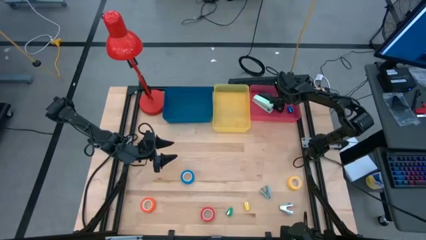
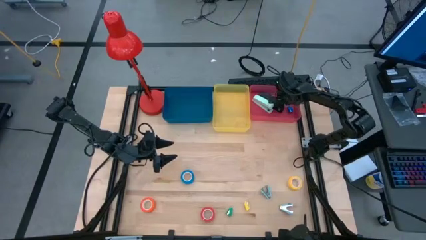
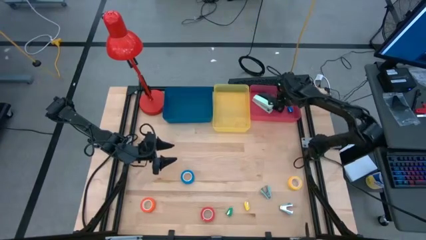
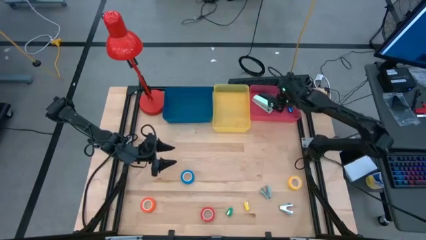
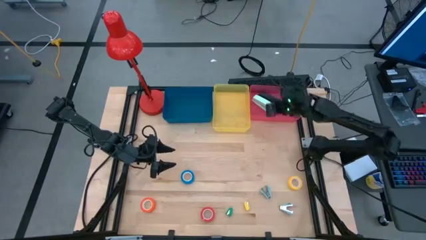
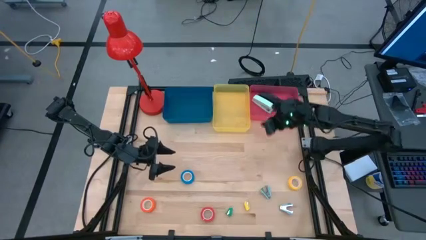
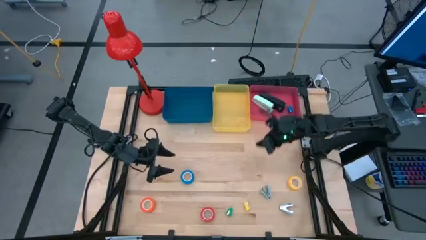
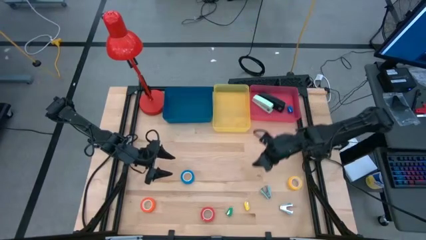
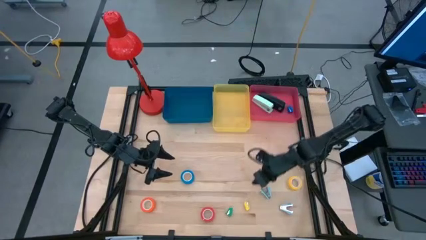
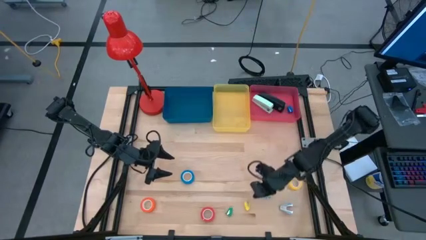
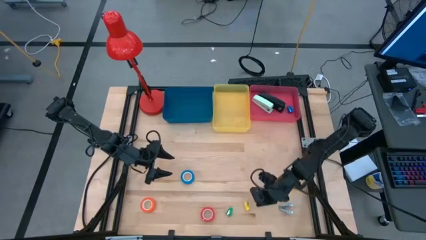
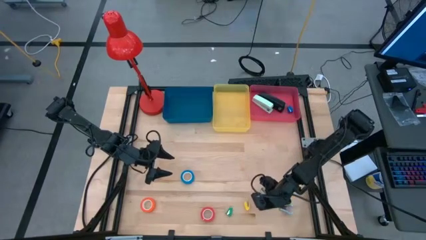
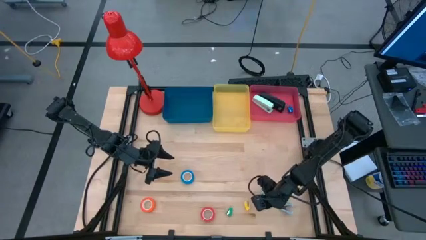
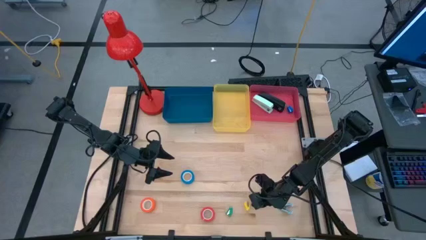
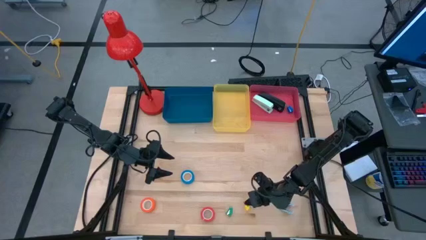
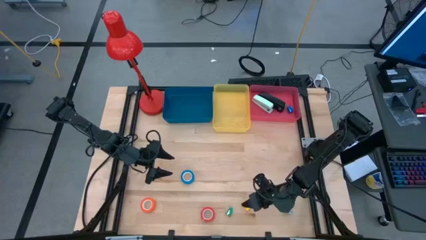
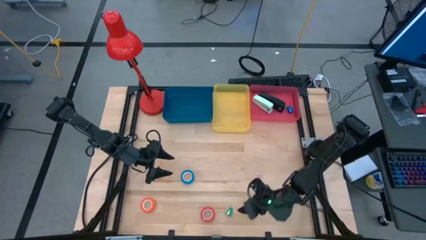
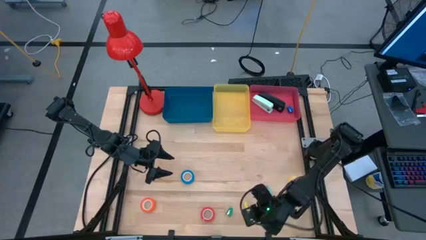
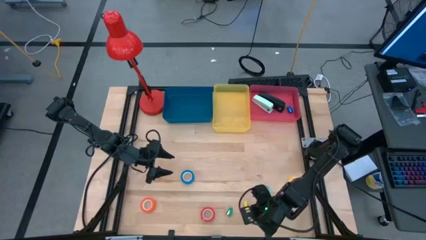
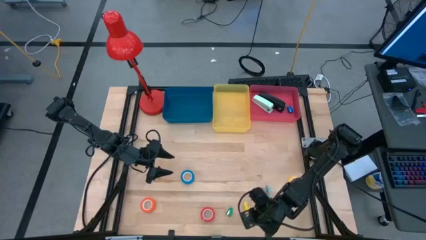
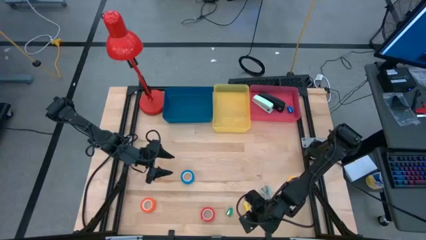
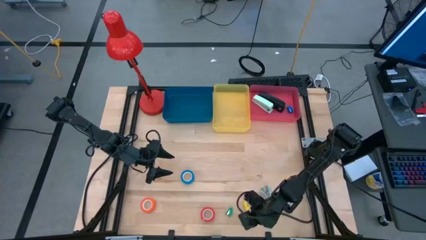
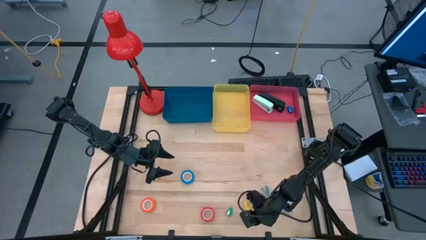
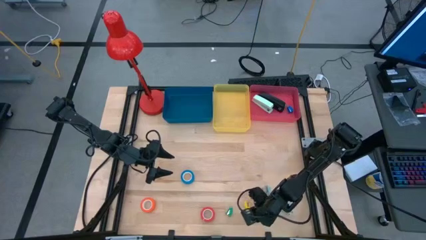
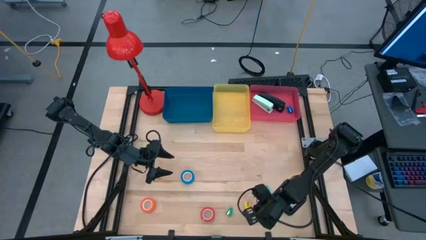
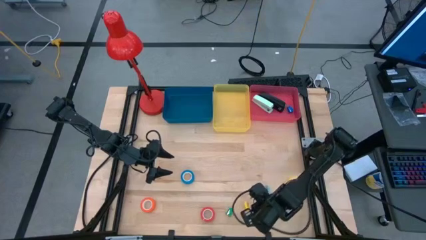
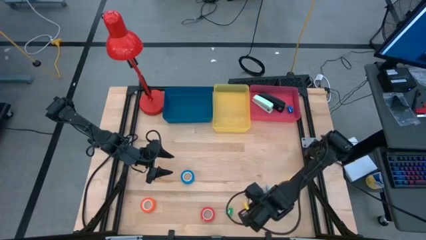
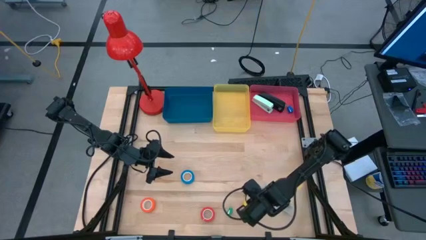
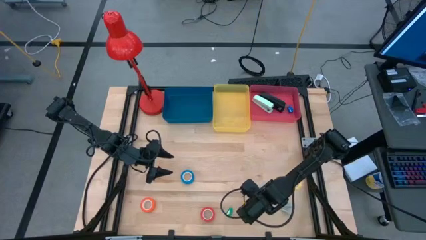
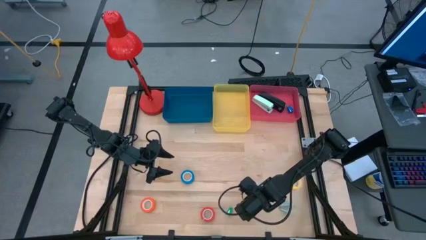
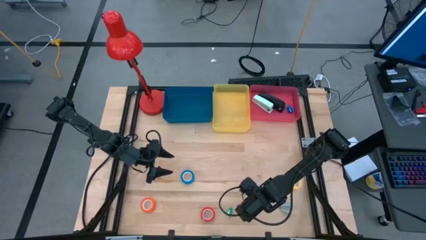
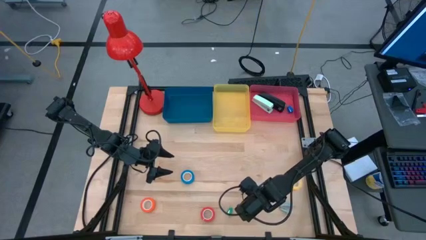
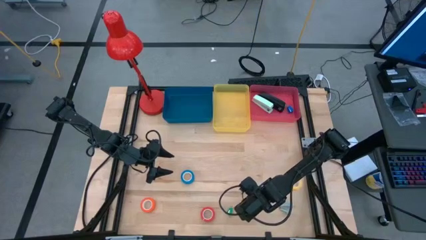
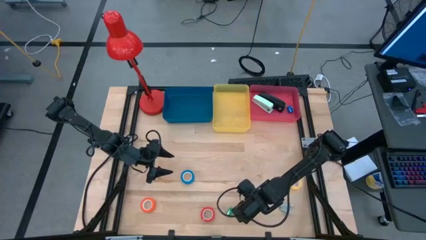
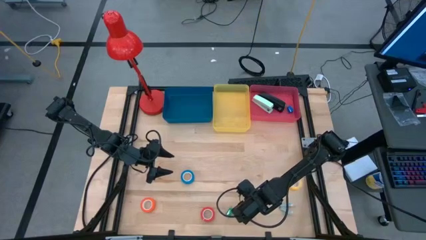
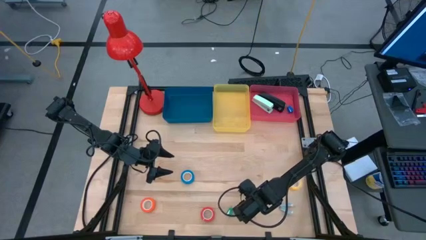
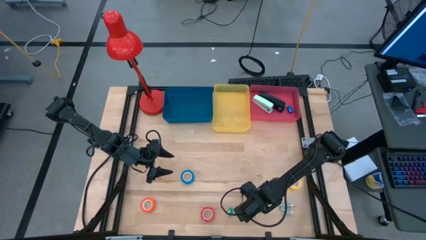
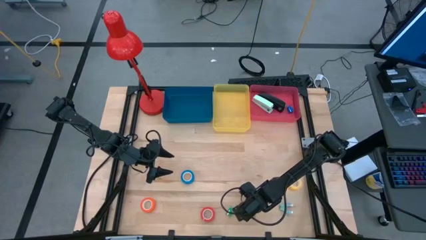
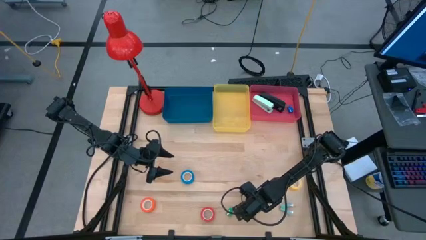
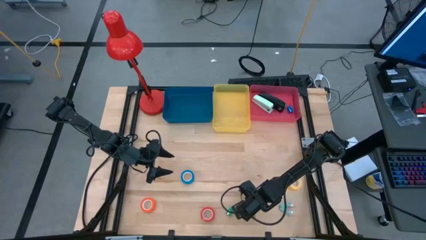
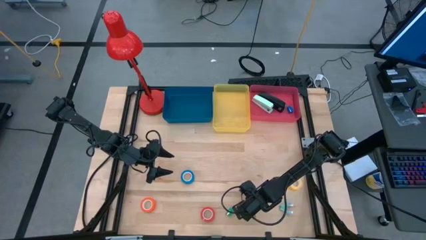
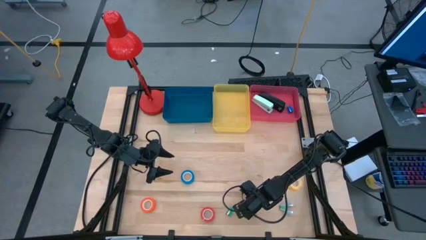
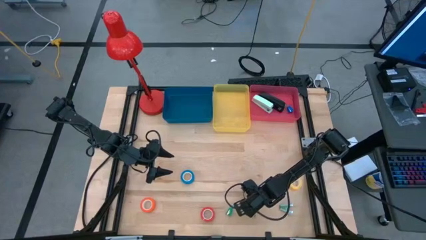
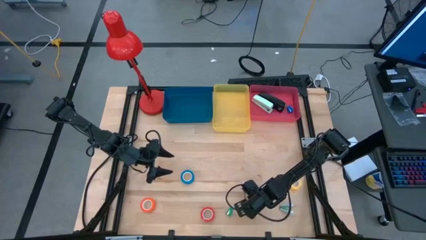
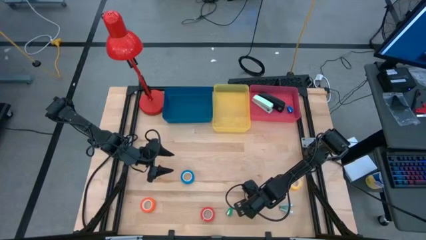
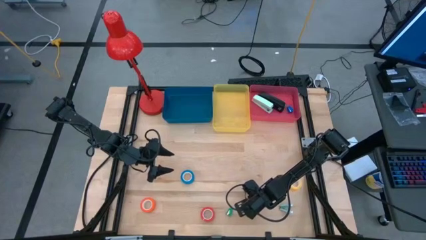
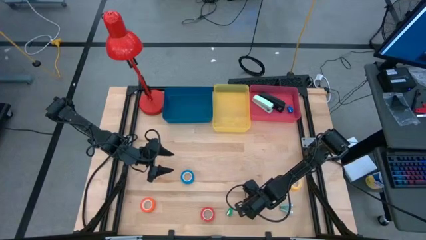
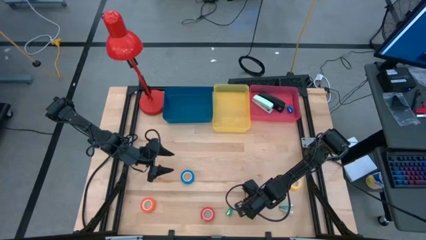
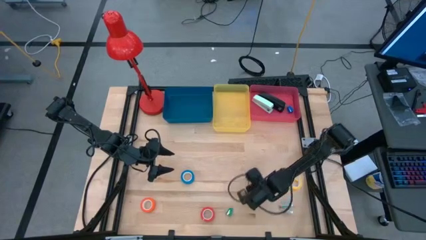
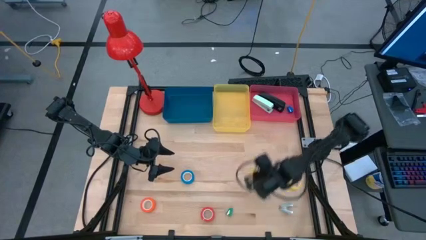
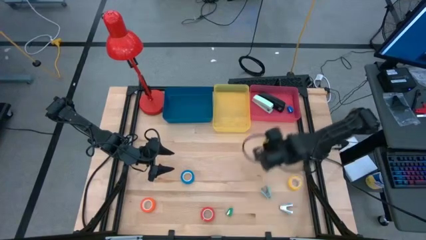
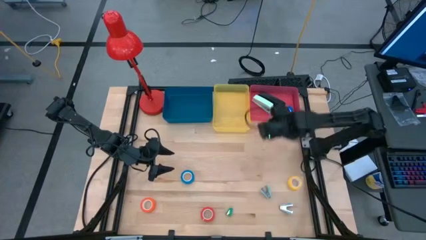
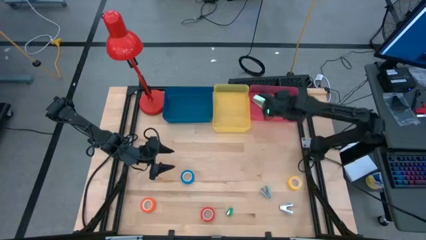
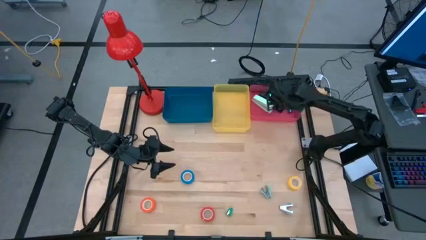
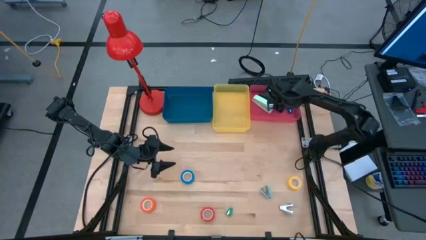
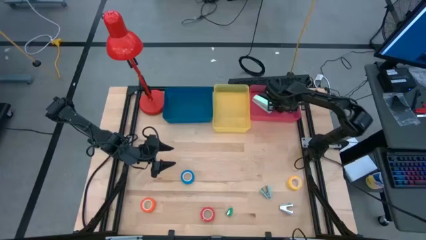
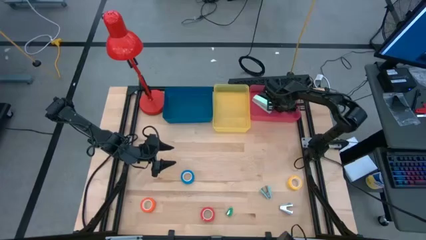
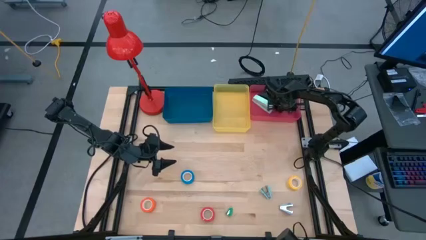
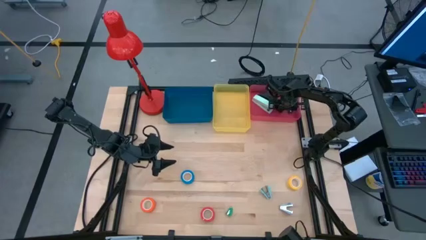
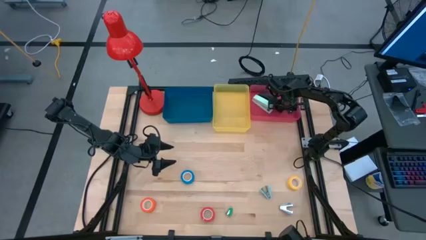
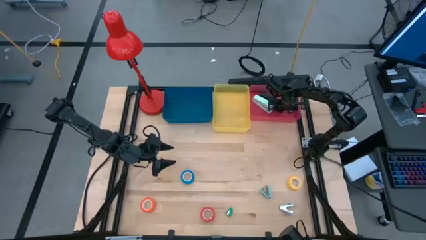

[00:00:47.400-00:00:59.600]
Task: Pick and place Stapler, Stapler remover, tape
Put the yellow stapler into the pink bin

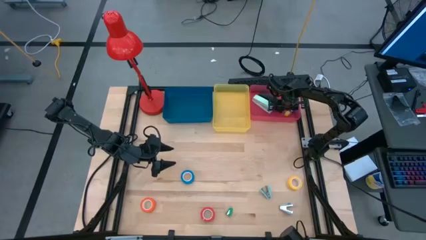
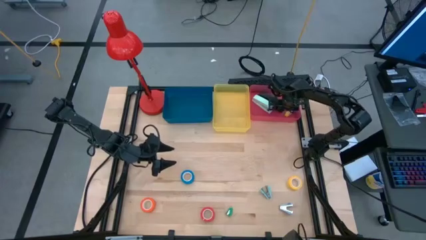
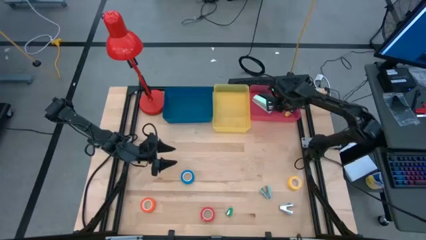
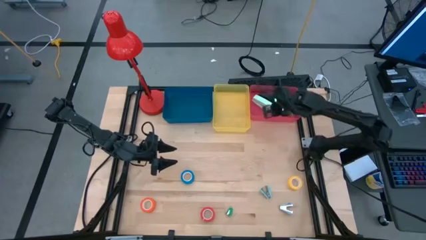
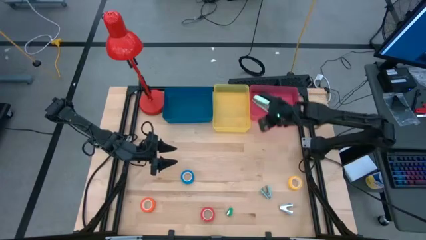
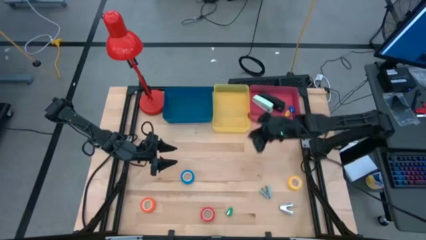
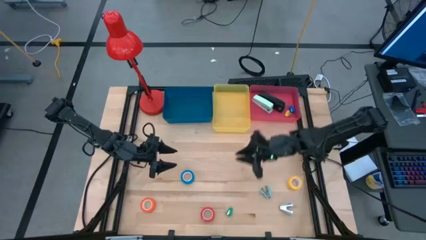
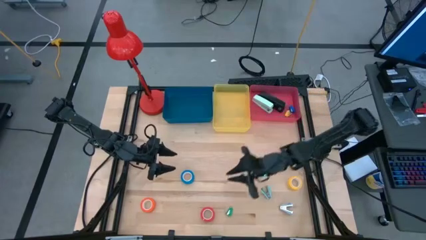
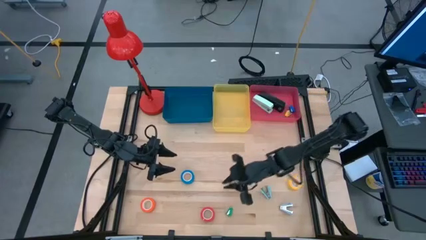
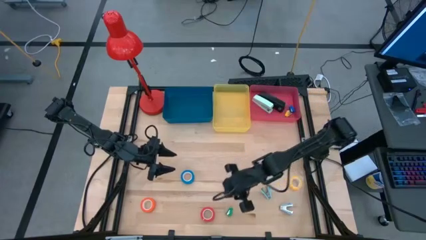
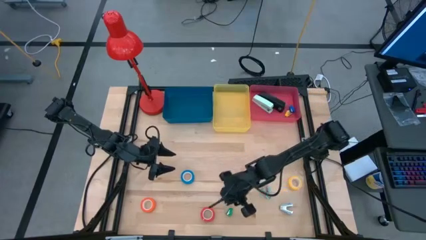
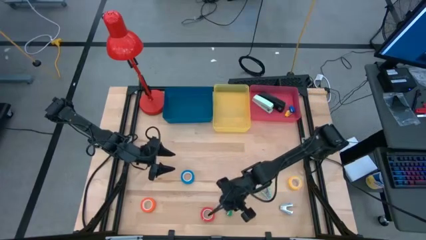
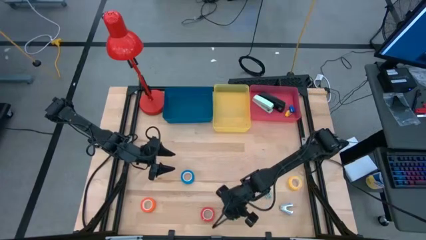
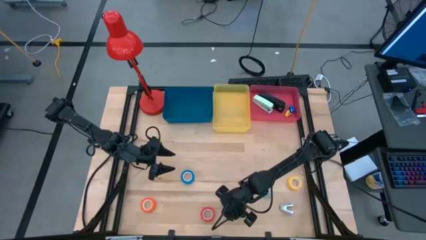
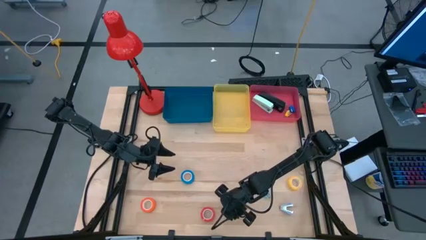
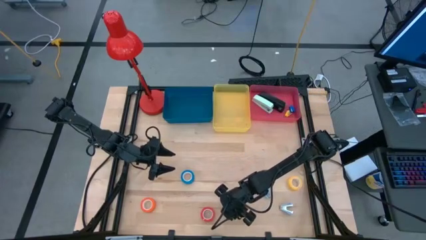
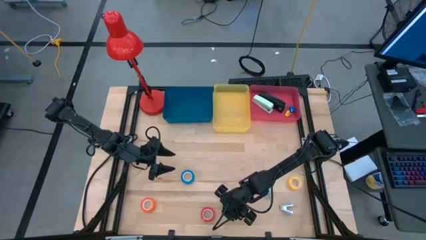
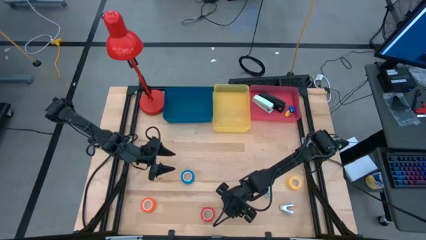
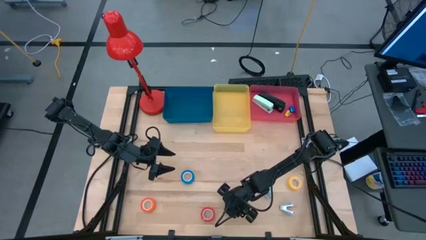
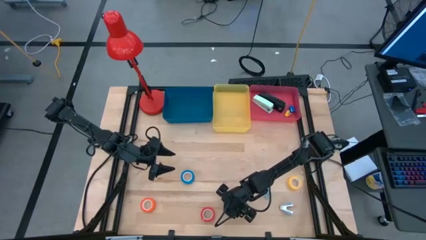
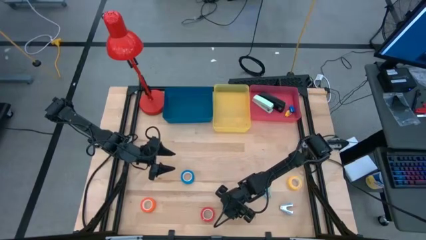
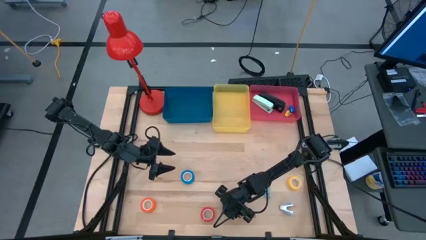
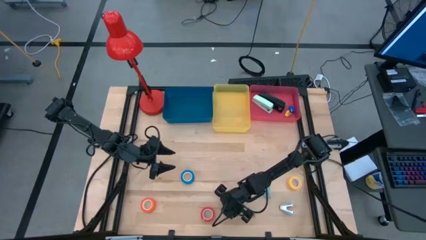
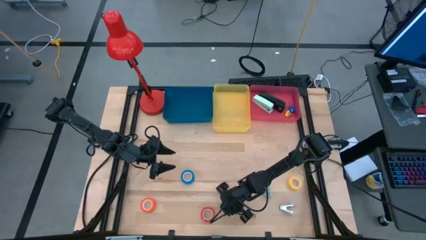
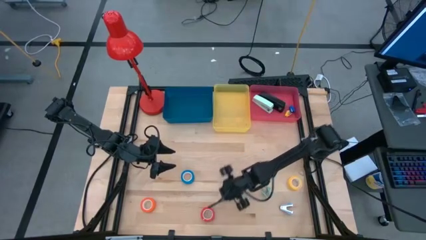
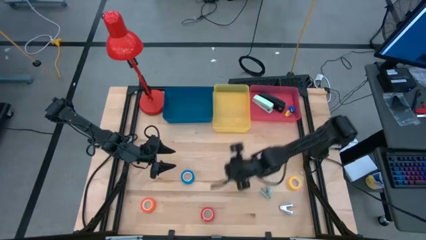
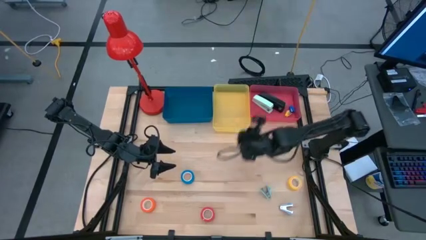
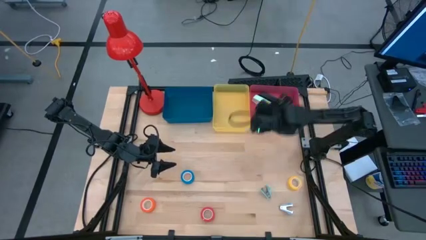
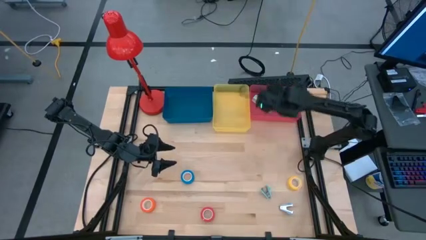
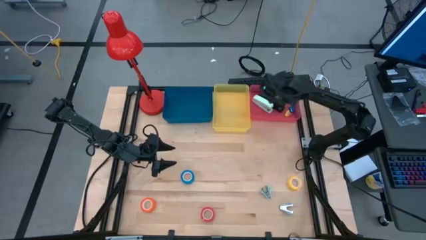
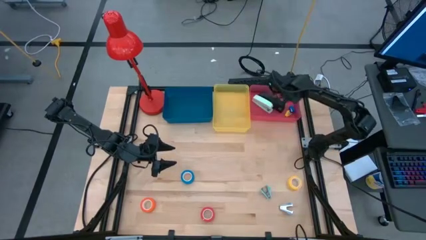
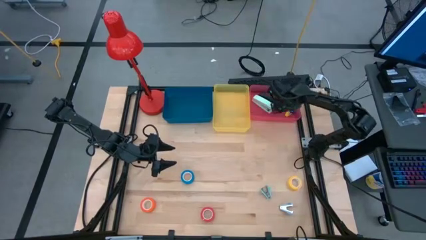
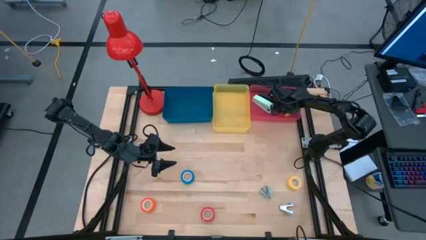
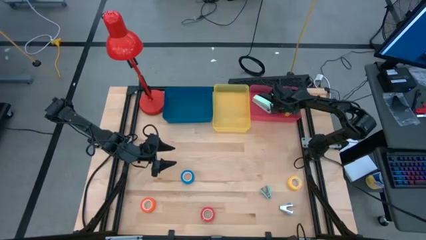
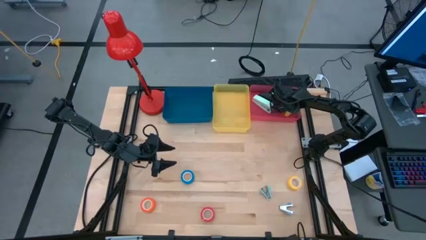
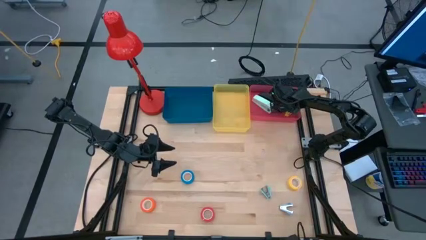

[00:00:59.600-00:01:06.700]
Put the green stapler into the pink bin
